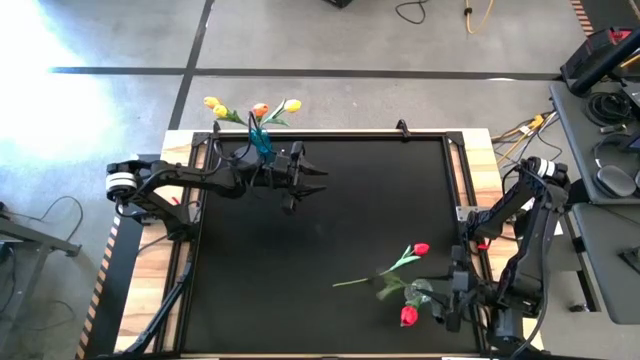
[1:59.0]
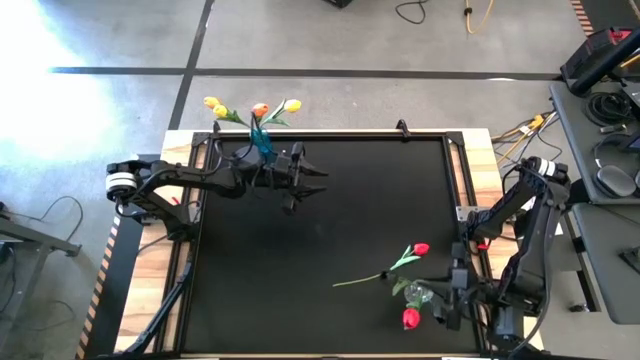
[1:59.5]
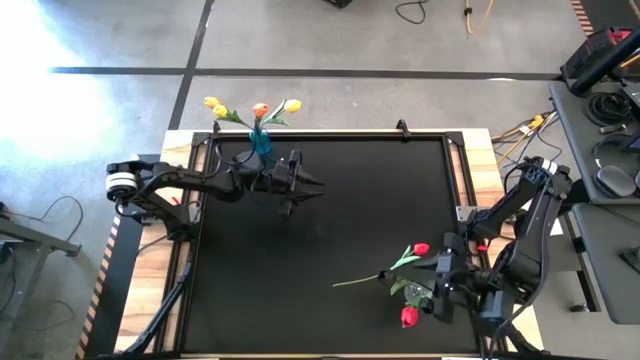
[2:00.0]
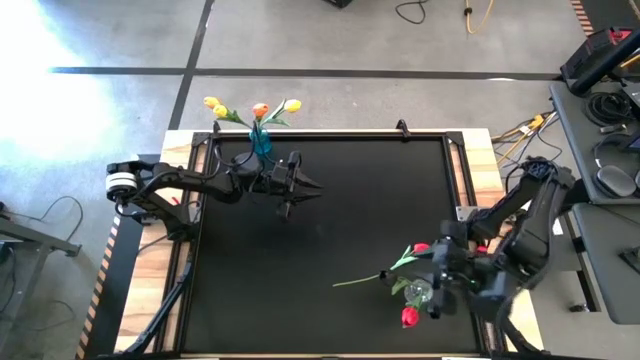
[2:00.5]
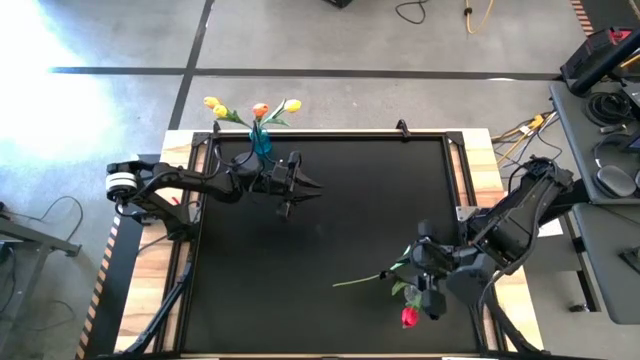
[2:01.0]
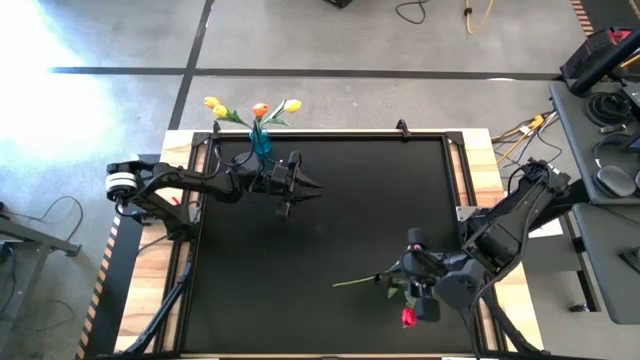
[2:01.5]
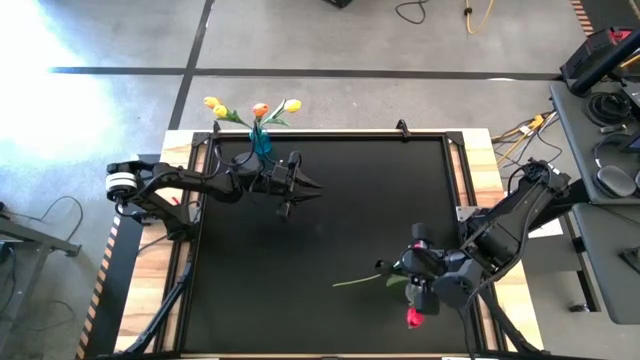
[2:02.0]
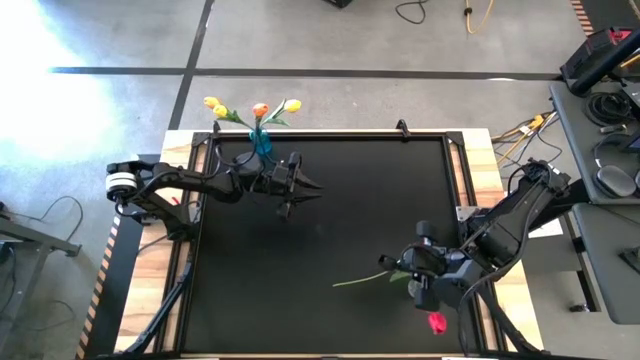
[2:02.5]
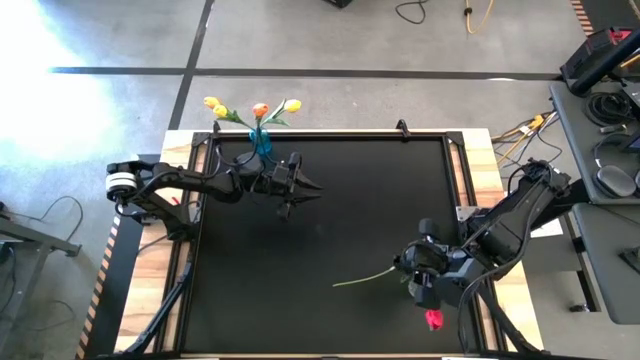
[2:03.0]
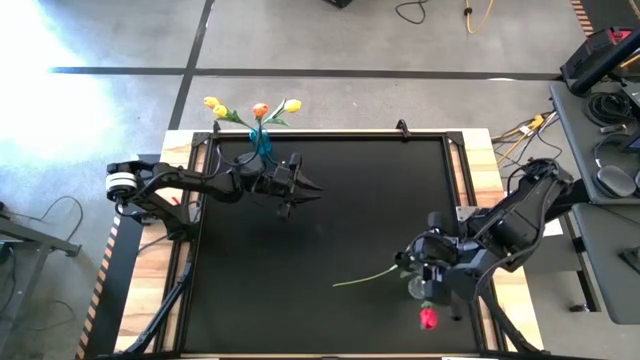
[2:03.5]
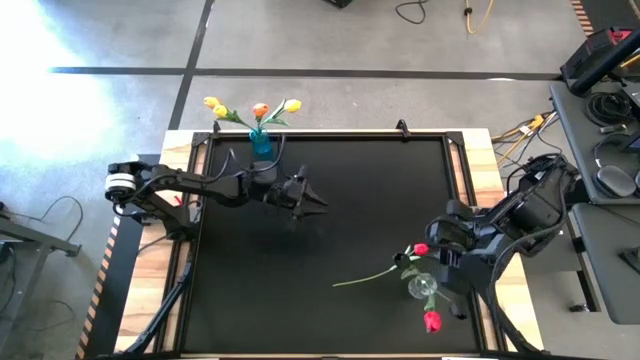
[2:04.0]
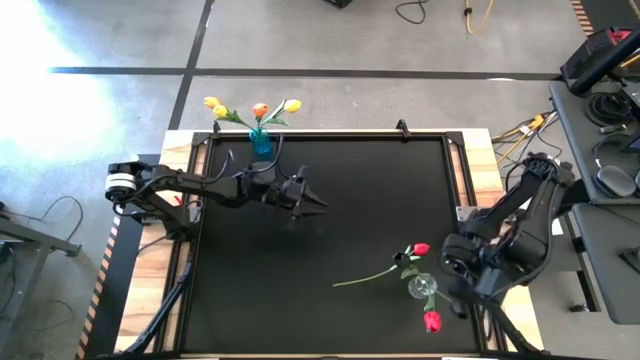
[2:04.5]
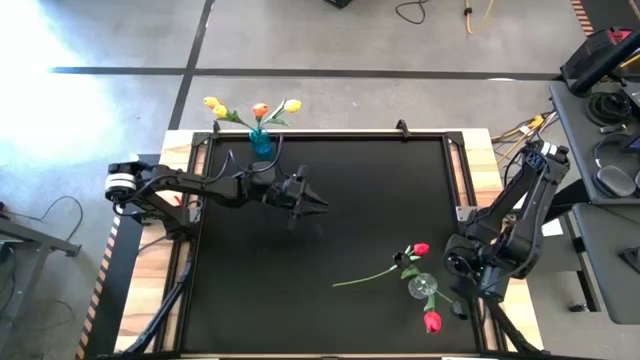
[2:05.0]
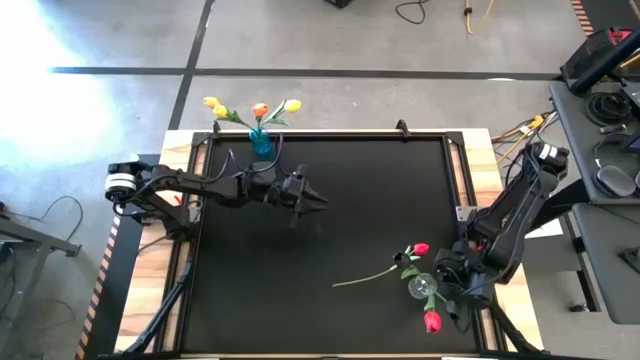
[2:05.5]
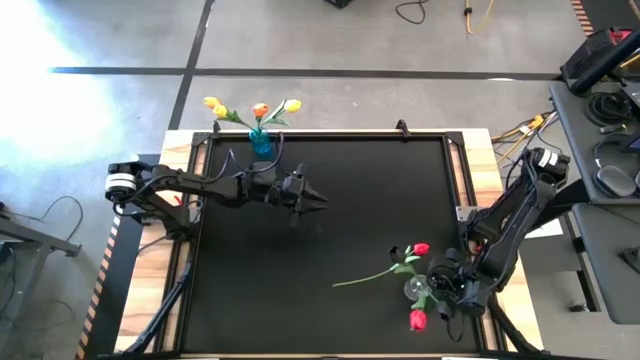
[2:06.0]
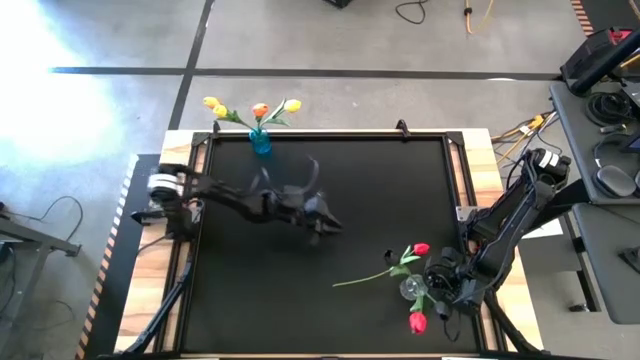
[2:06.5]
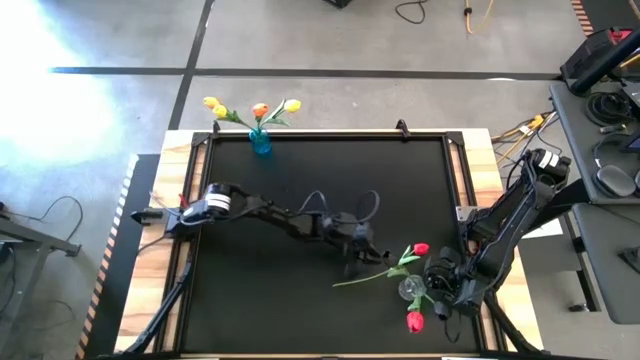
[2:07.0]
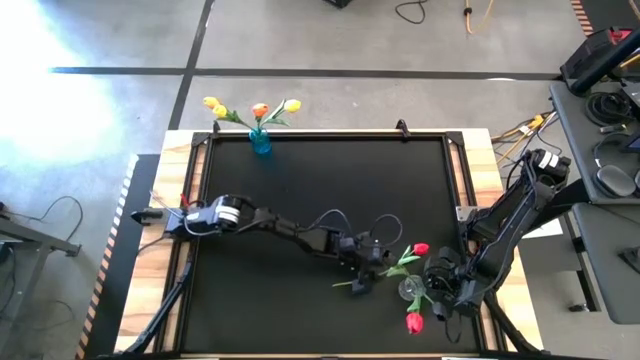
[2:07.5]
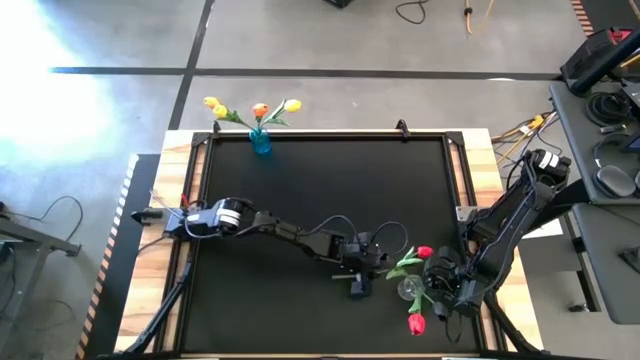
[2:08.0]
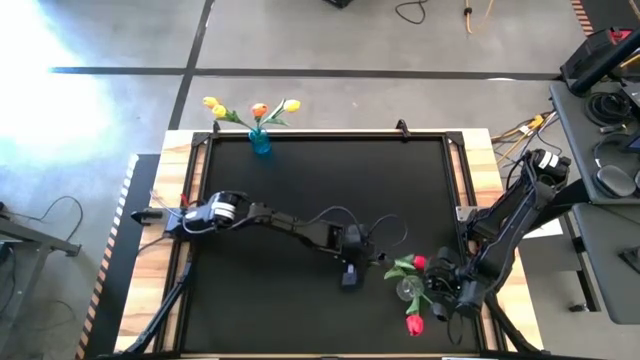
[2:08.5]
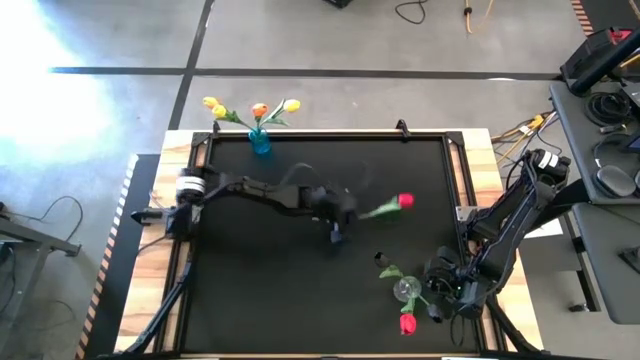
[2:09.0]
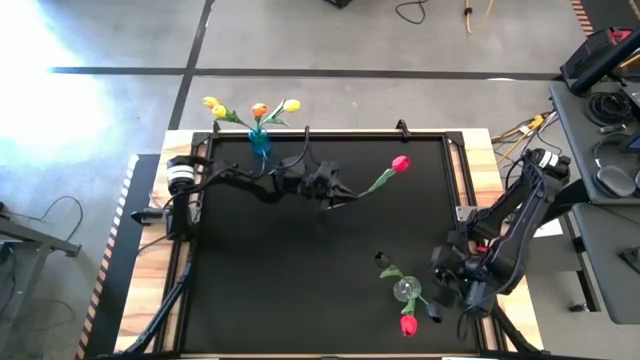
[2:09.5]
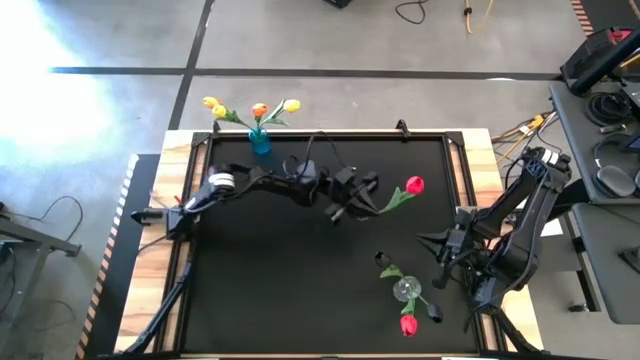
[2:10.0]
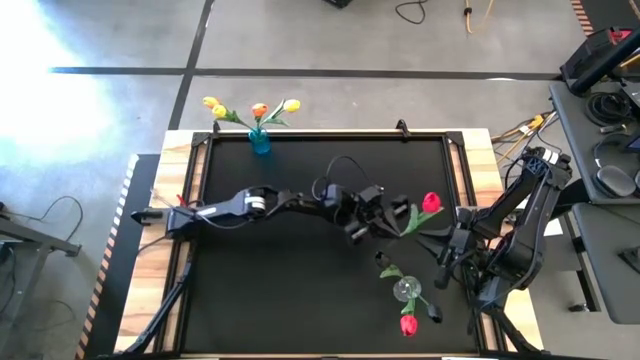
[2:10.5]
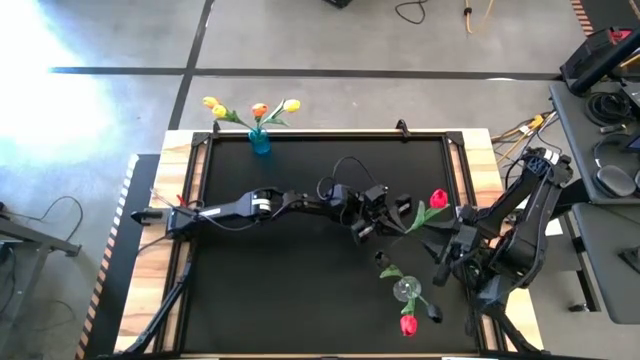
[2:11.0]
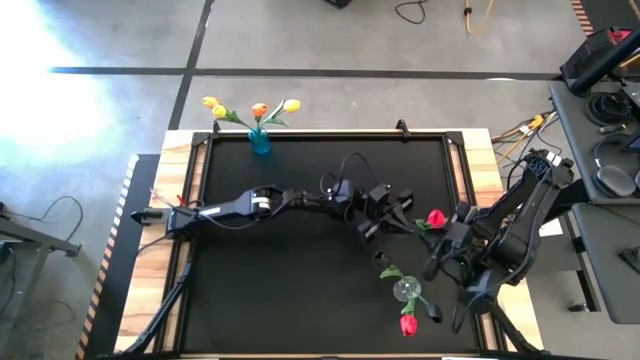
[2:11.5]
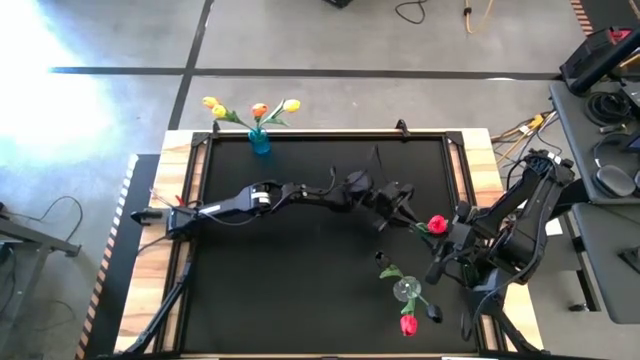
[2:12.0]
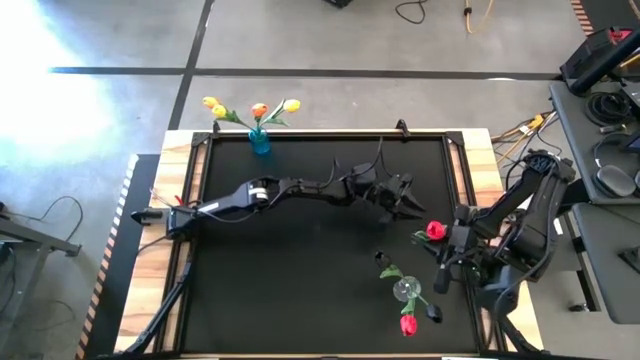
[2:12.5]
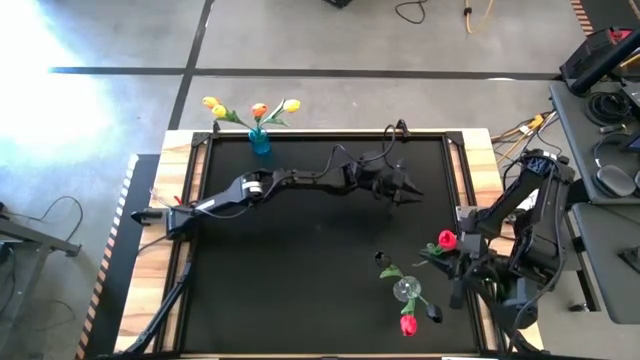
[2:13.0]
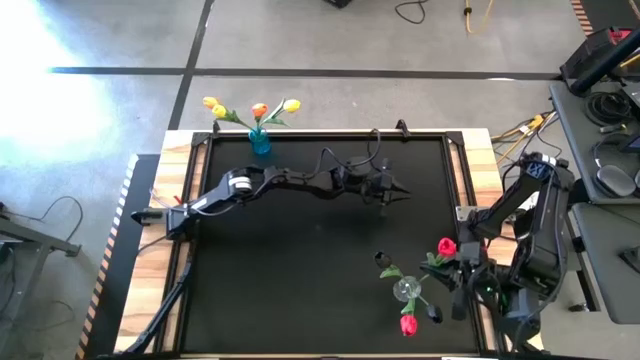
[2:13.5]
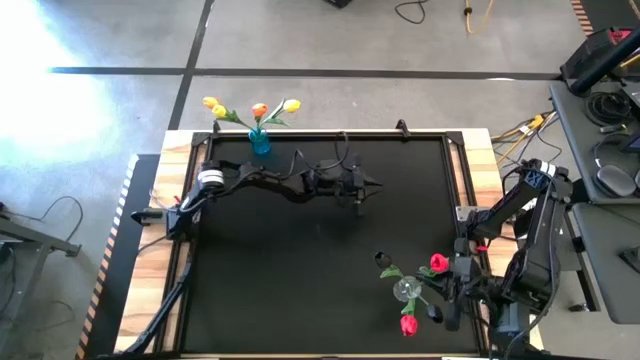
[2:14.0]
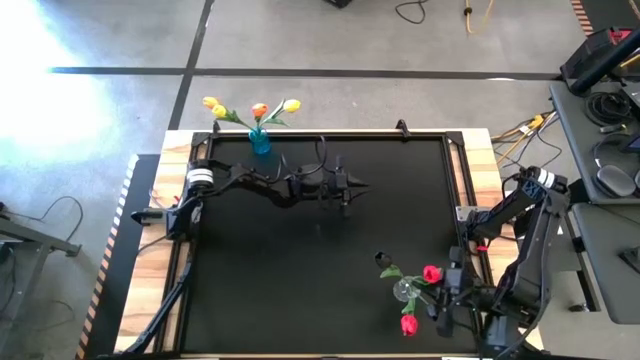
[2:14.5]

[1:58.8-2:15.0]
Task: Sort flowers into vase by color
Put the red flower into the transparent vase

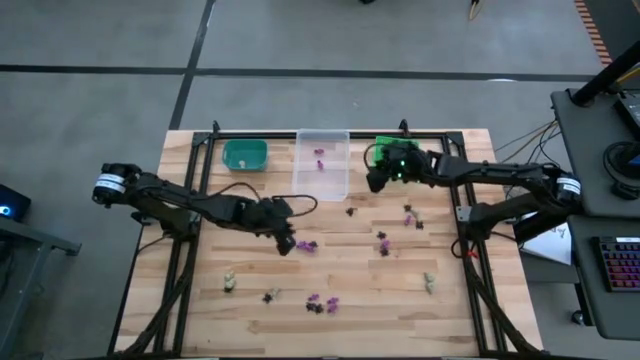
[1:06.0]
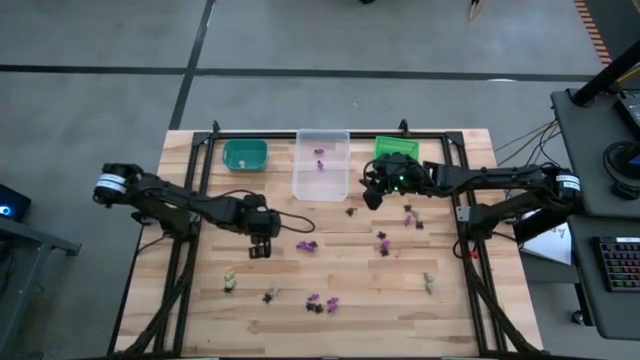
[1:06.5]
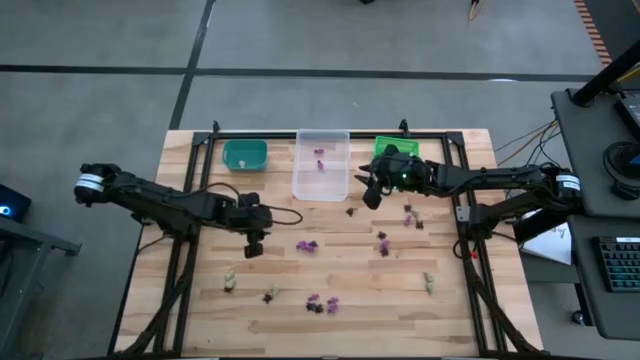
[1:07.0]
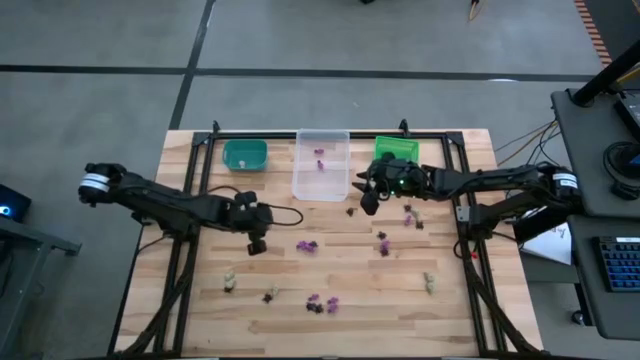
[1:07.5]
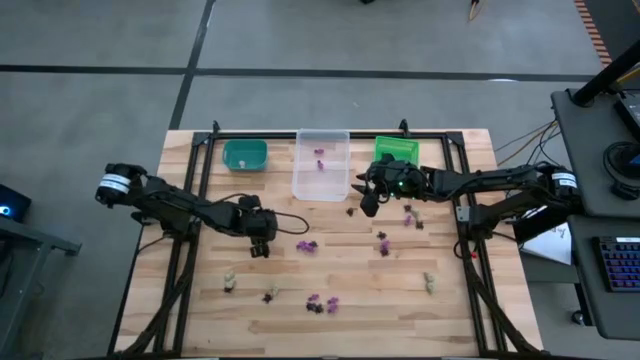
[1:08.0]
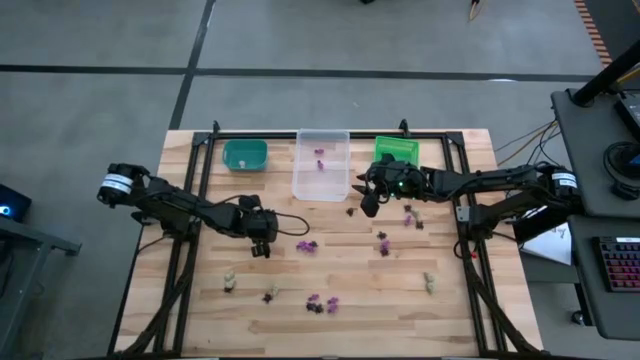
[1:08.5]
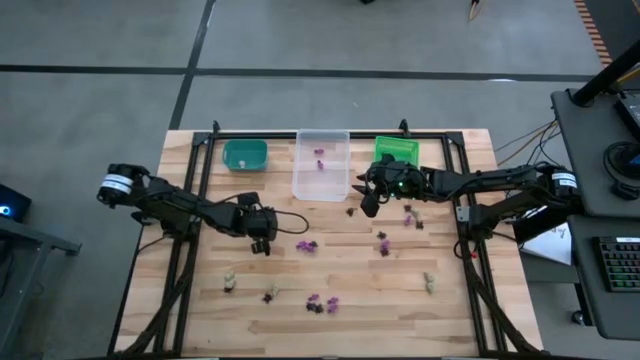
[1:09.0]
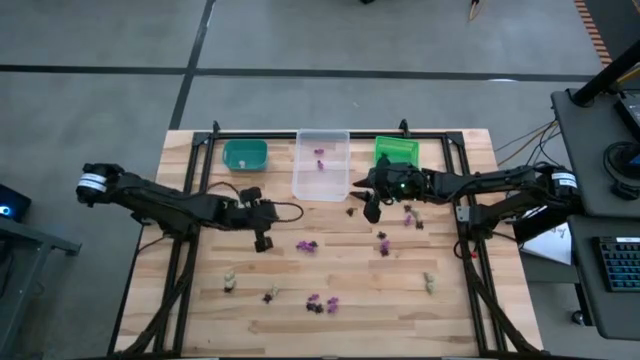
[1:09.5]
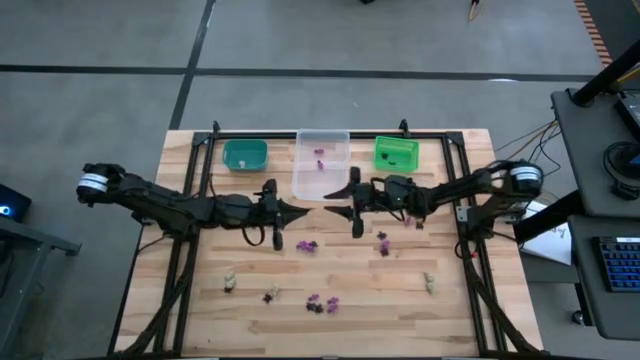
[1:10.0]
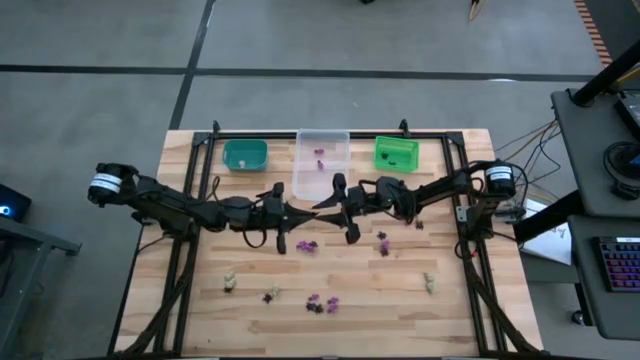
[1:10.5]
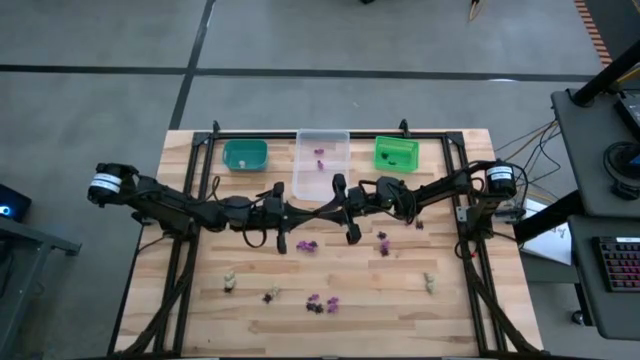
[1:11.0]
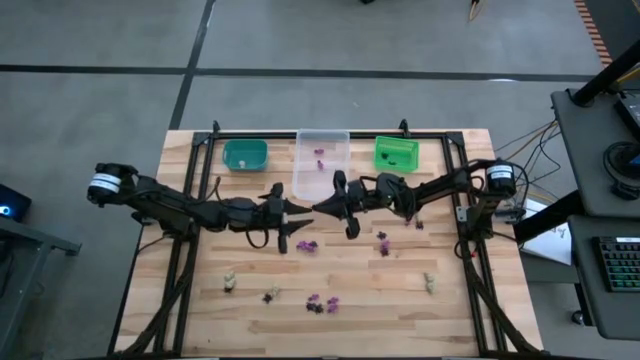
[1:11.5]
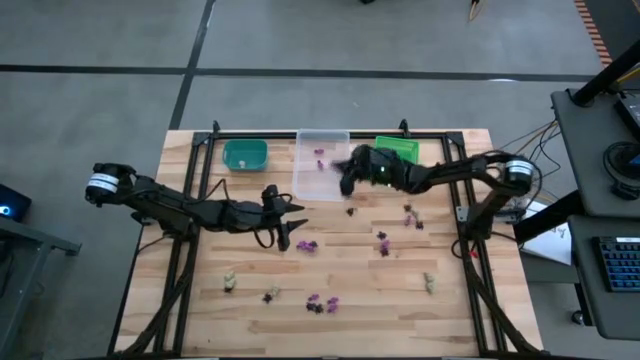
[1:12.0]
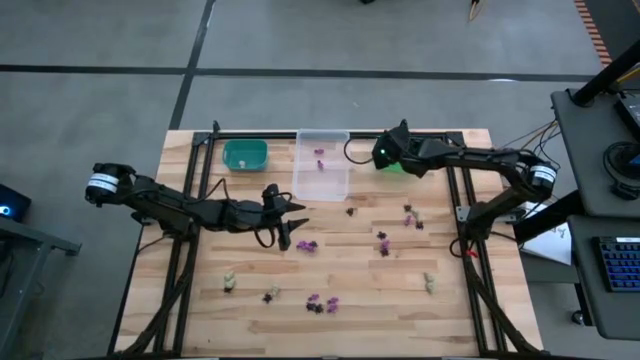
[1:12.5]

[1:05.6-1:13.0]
Task: Sort Halloween decoration
Put the black spider toy into the green bin
